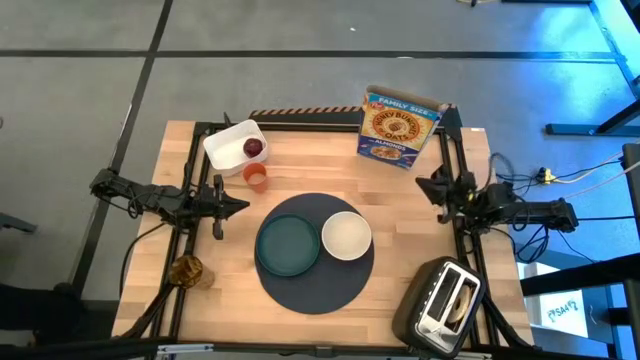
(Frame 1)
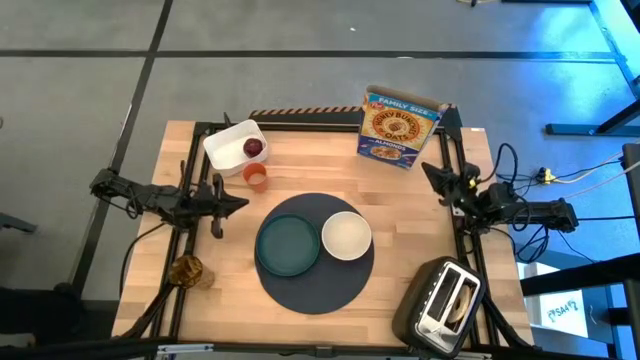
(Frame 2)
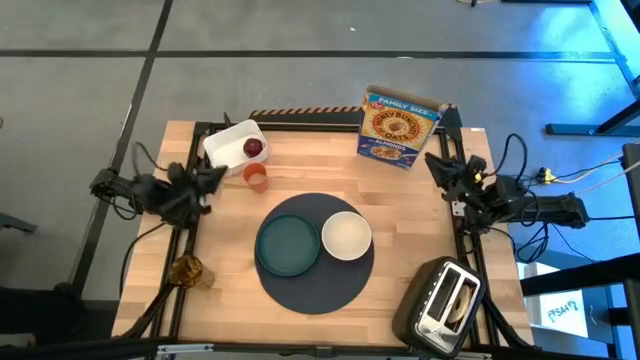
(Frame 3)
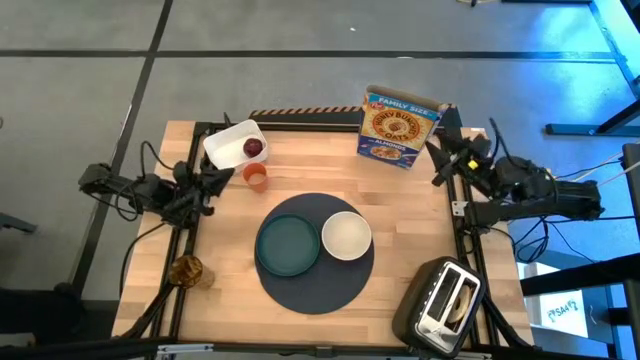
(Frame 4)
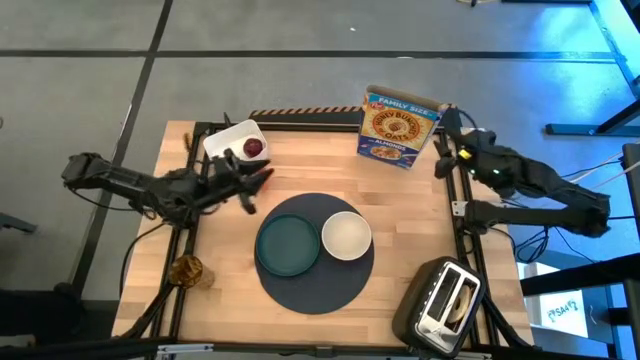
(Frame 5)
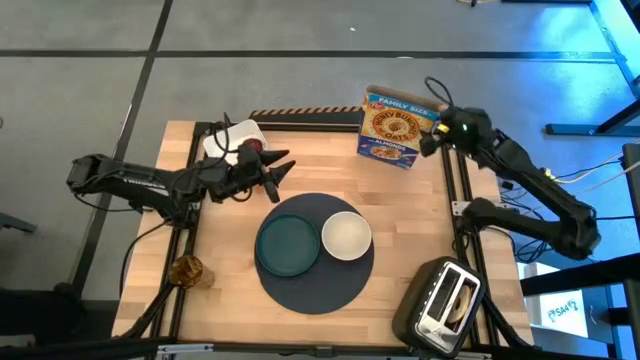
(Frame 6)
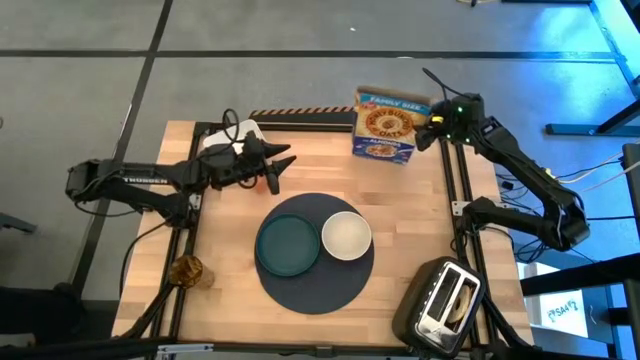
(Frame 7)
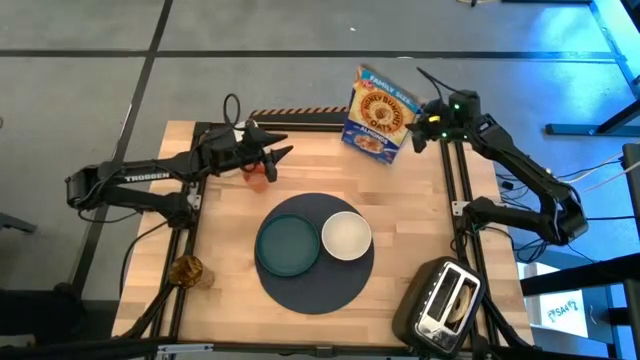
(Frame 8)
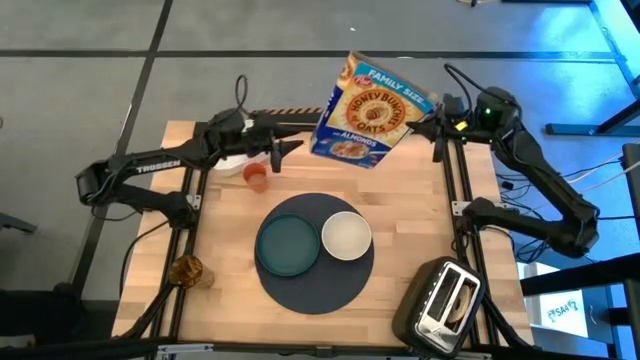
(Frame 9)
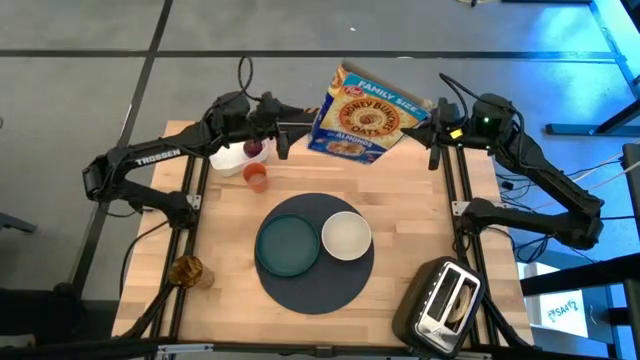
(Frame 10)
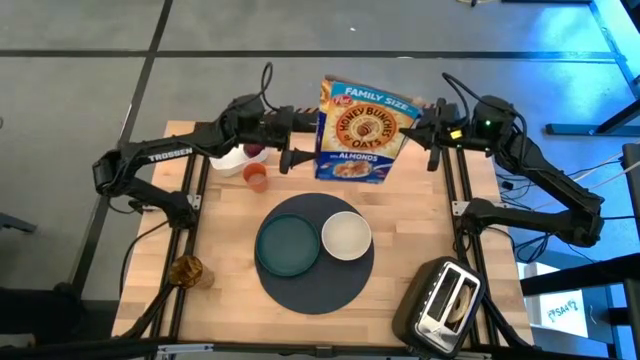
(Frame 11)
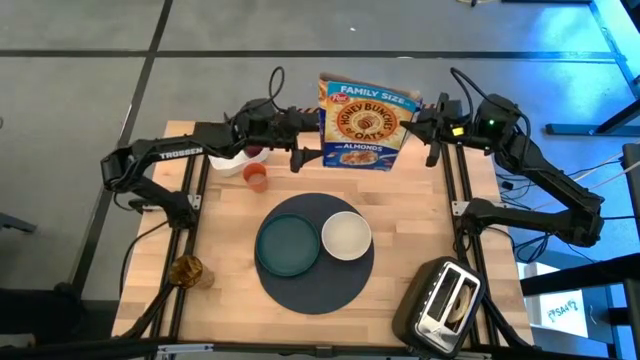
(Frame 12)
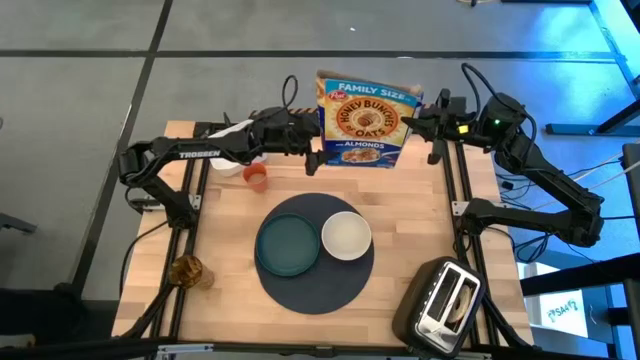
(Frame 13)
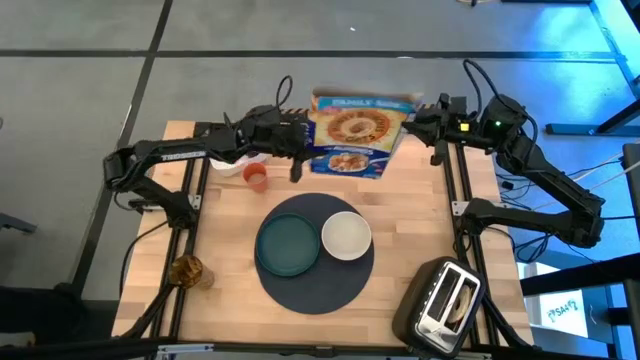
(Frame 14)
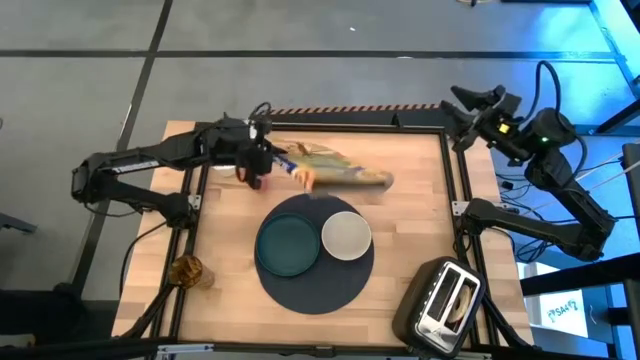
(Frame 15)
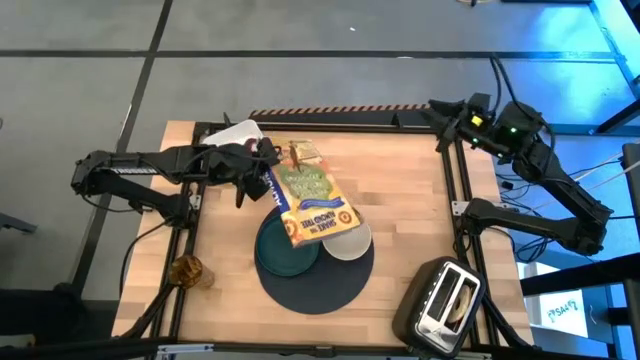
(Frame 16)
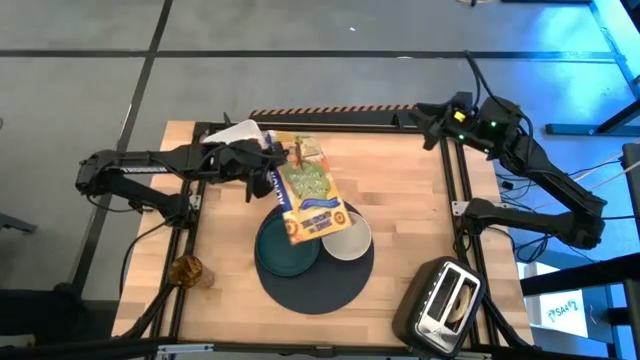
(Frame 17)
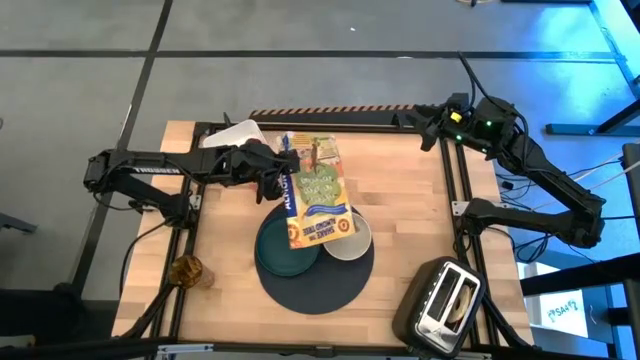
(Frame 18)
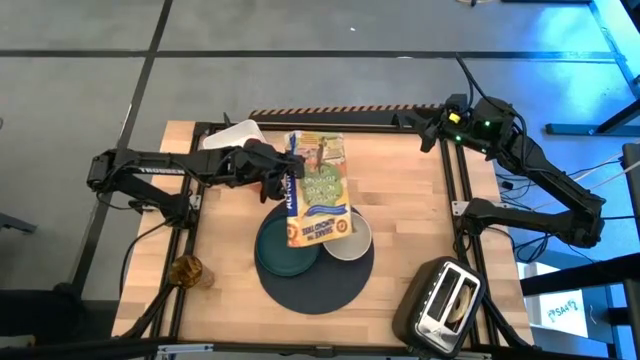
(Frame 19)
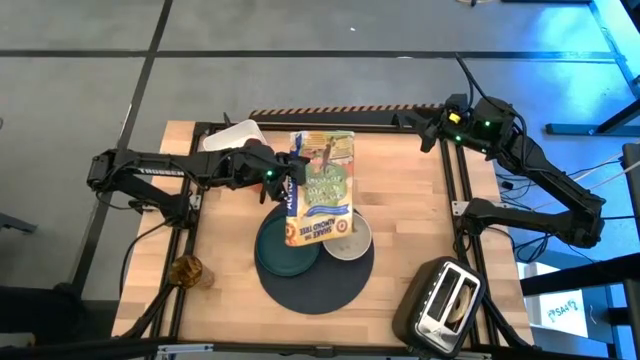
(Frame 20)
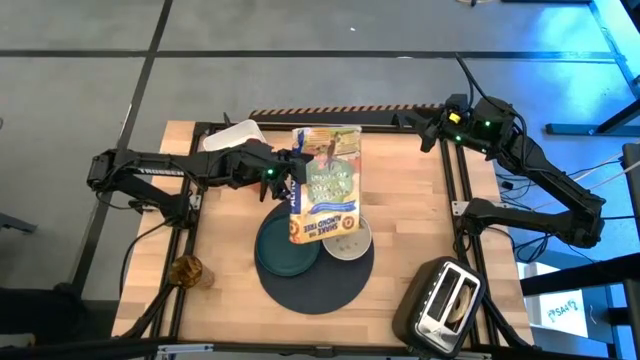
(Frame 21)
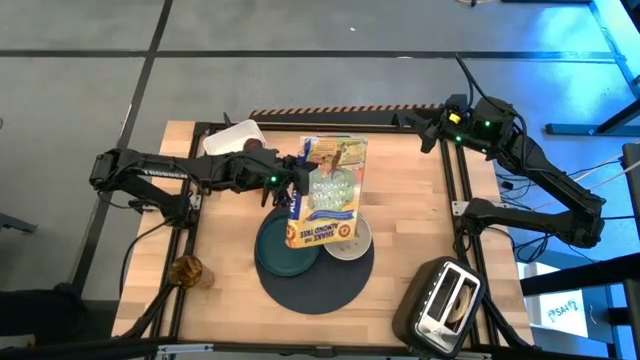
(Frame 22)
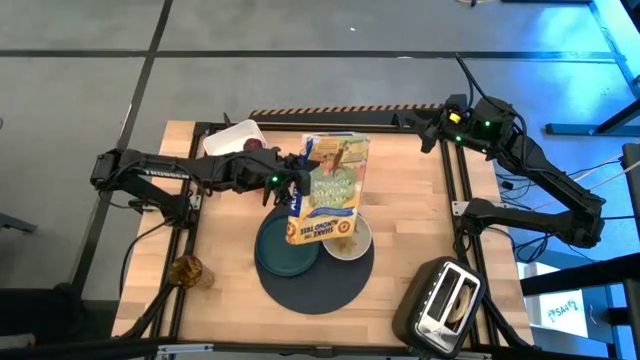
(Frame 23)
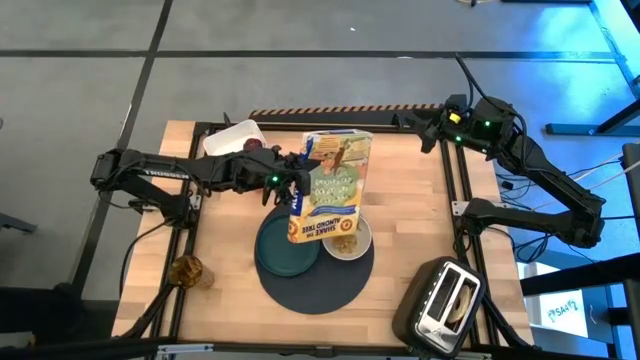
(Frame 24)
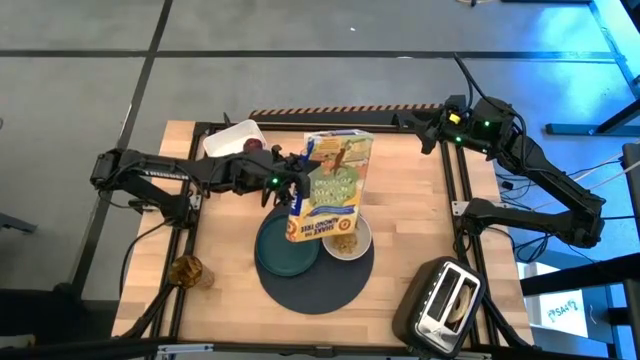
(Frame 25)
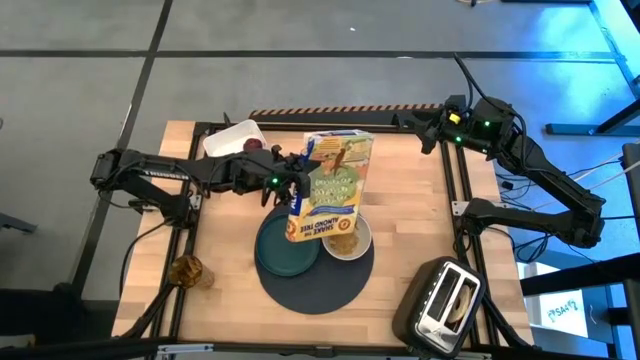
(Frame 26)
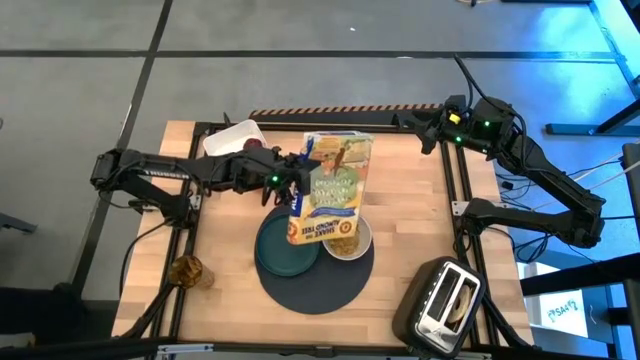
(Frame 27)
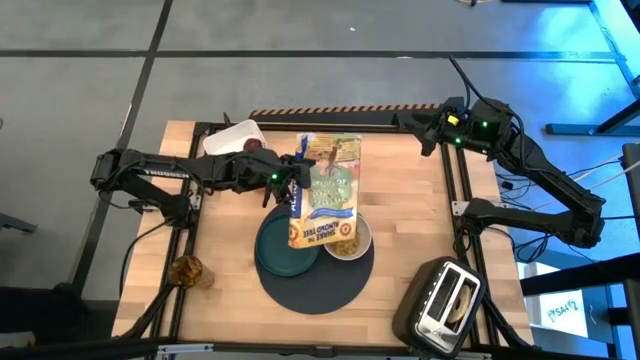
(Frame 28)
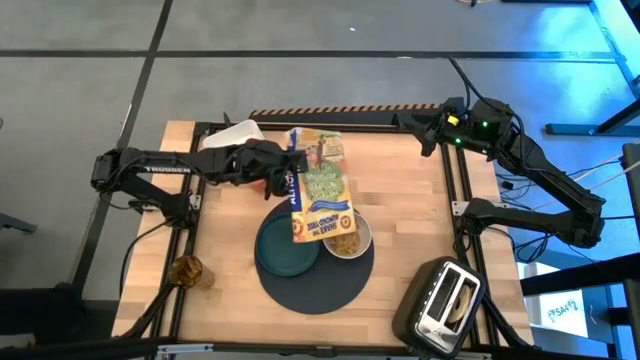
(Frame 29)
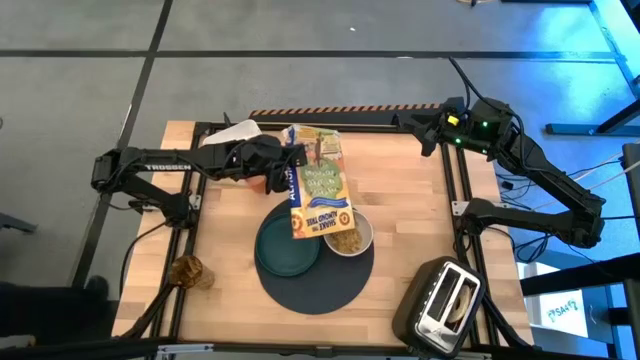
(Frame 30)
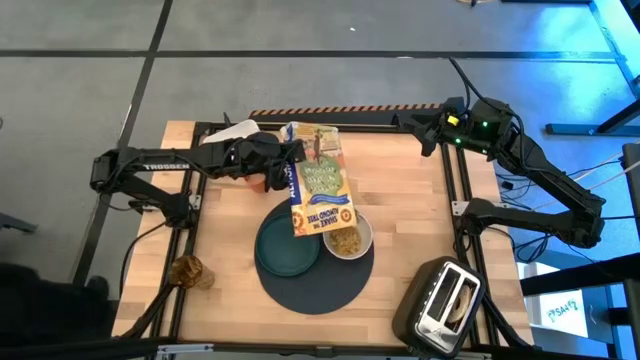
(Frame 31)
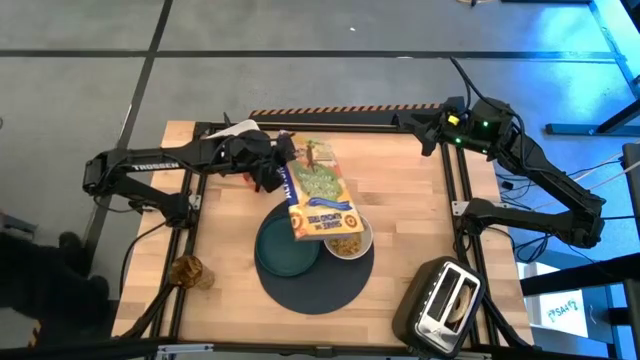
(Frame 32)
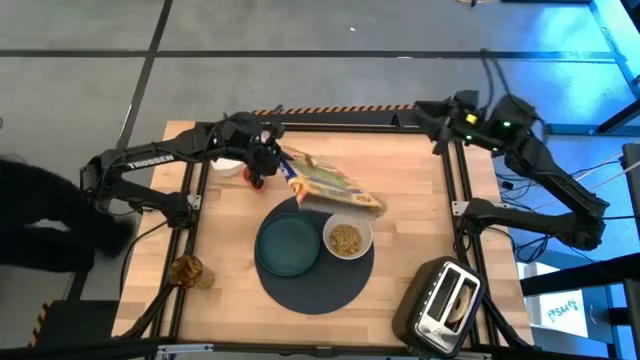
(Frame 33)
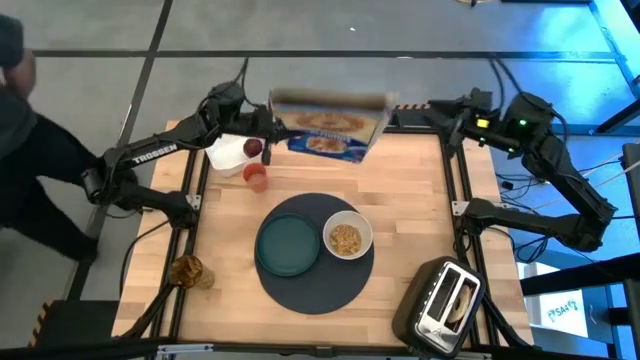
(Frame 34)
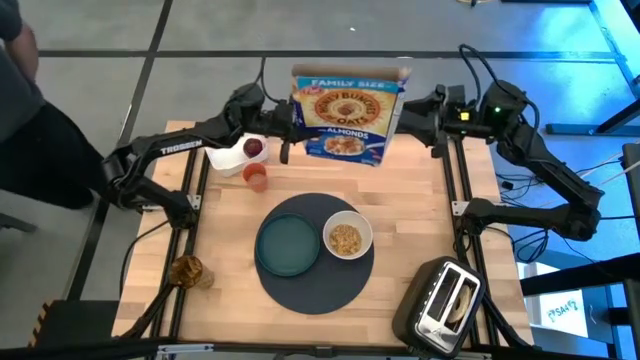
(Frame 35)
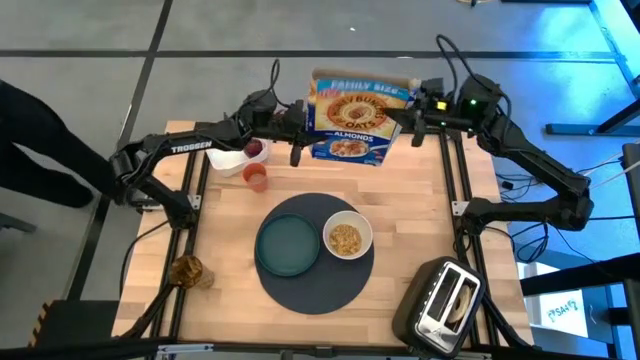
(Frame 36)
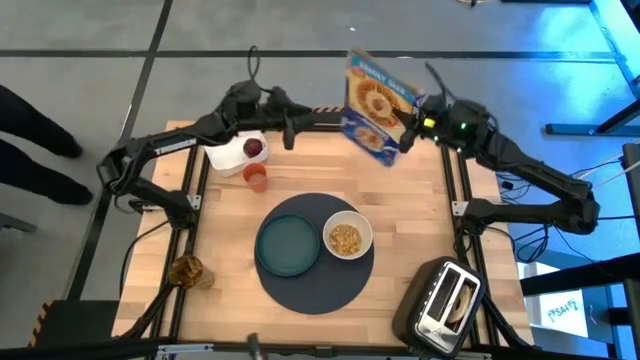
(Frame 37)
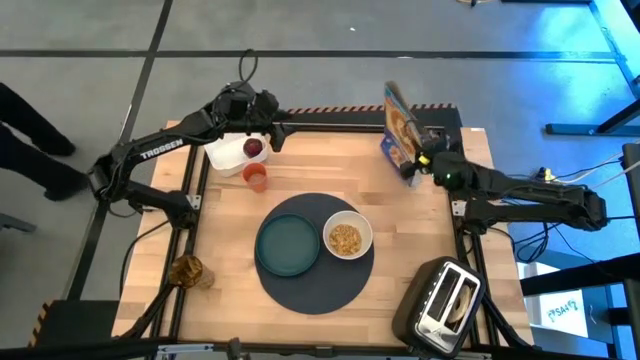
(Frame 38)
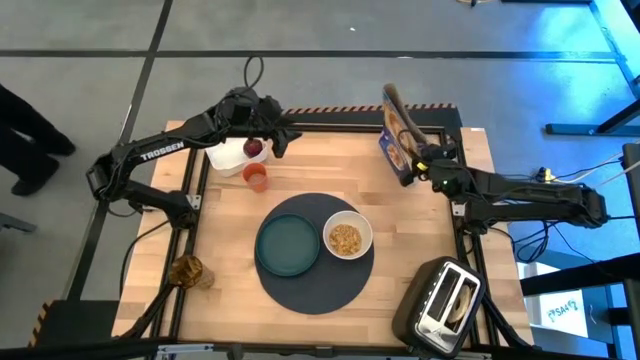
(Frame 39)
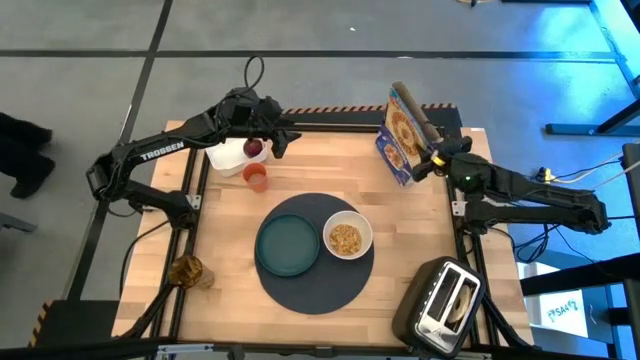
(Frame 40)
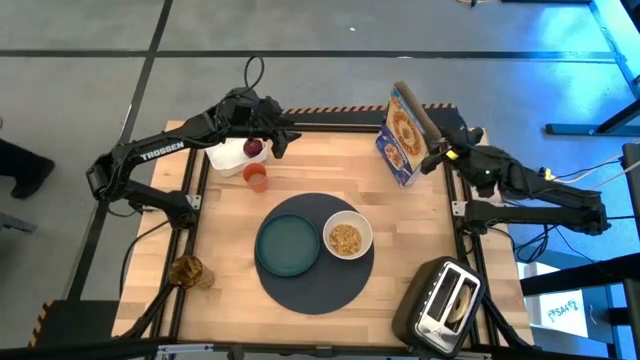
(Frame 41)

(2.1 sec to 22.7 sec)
Task: Arrange a breakfast setting
Pour the cereal from the cereal box into the gray bowl
